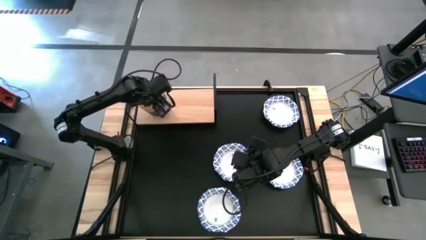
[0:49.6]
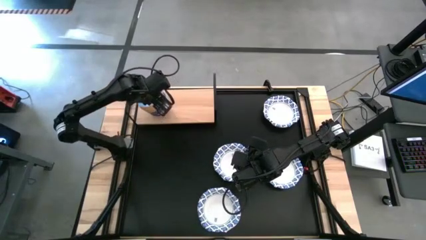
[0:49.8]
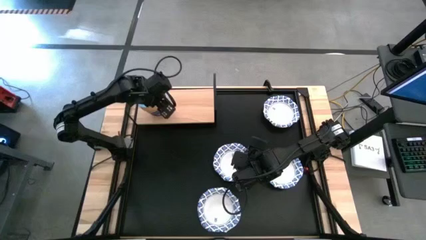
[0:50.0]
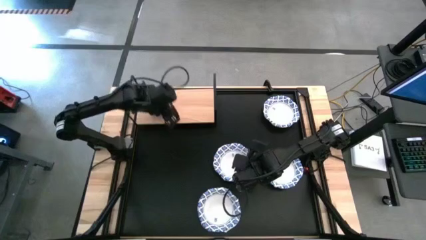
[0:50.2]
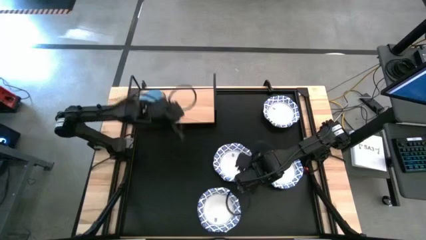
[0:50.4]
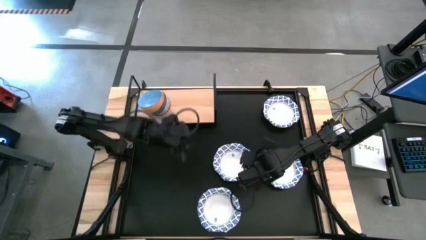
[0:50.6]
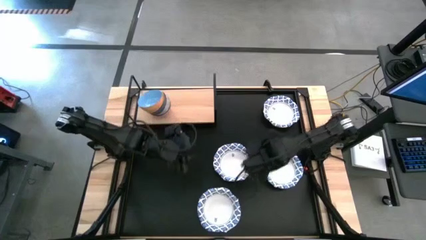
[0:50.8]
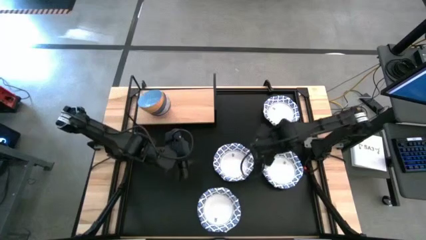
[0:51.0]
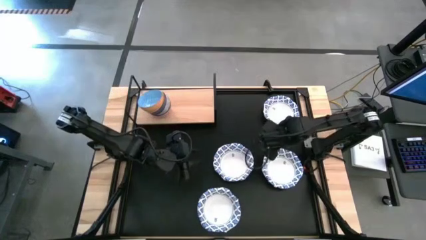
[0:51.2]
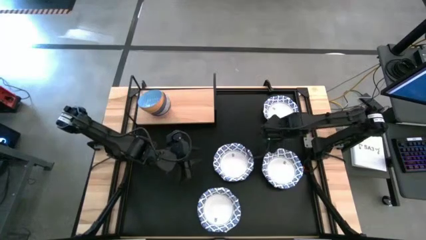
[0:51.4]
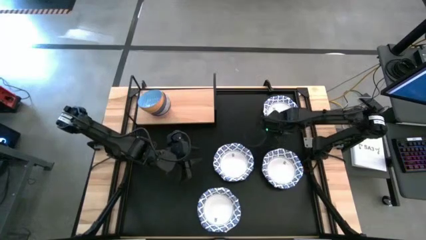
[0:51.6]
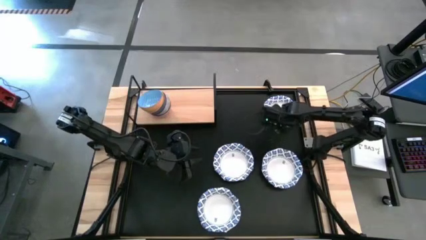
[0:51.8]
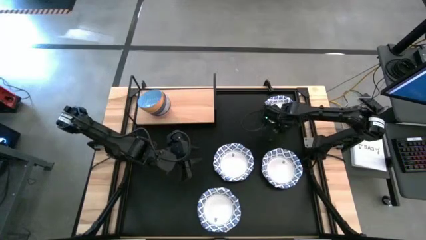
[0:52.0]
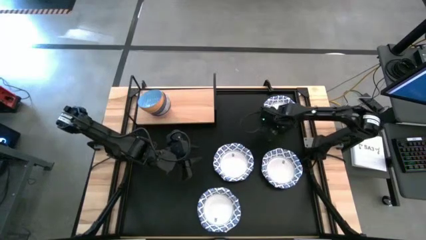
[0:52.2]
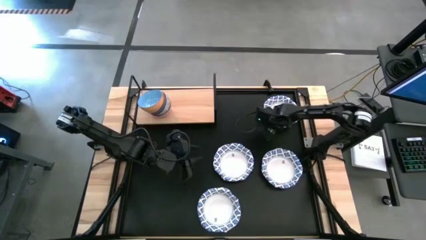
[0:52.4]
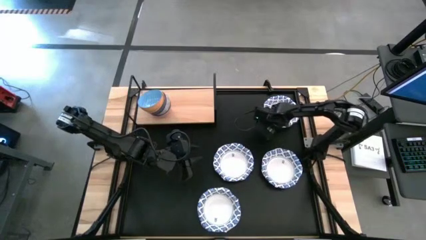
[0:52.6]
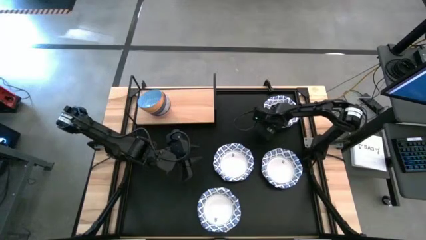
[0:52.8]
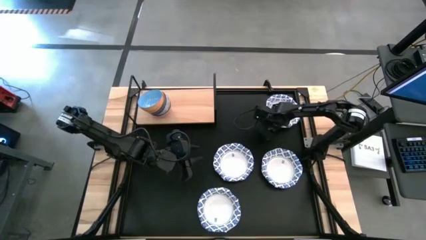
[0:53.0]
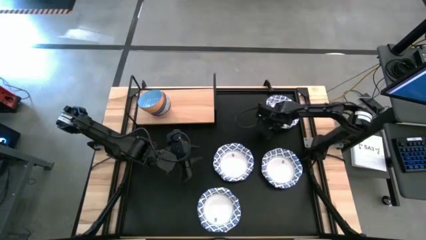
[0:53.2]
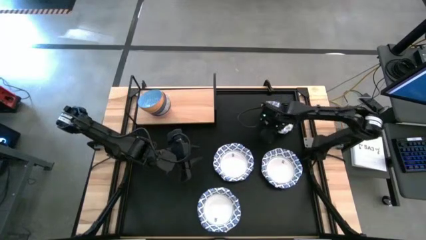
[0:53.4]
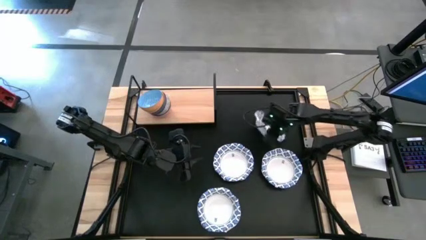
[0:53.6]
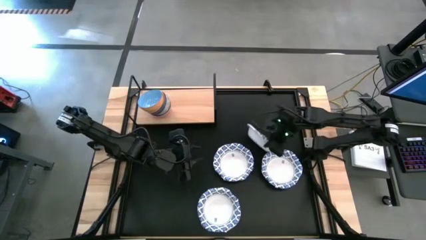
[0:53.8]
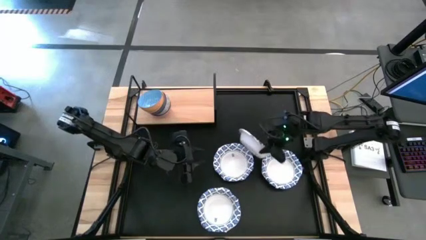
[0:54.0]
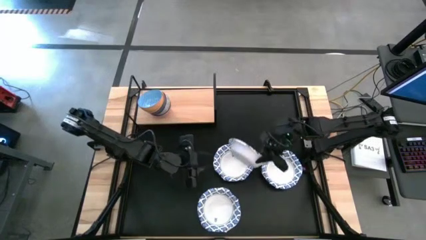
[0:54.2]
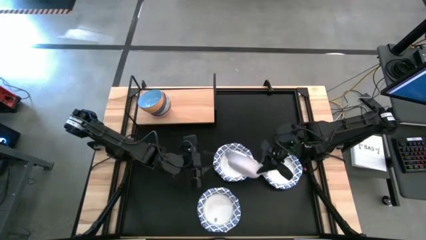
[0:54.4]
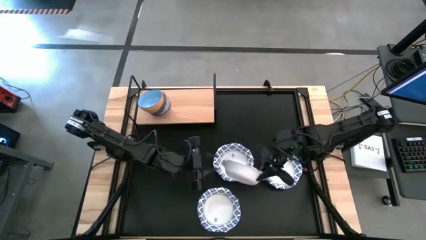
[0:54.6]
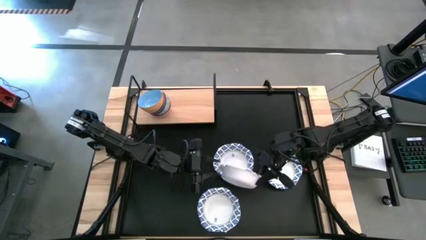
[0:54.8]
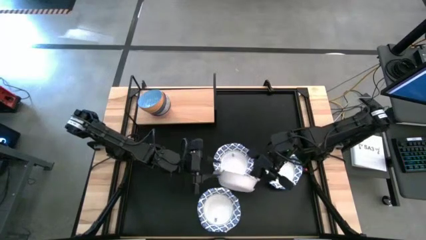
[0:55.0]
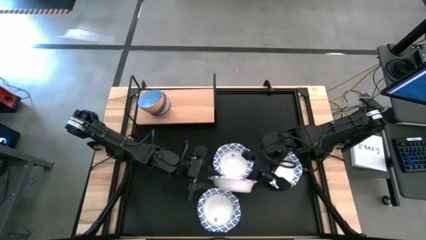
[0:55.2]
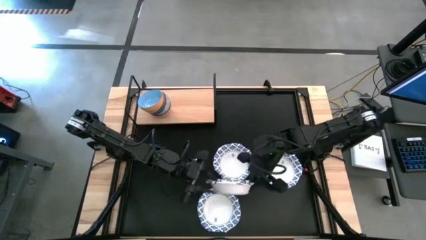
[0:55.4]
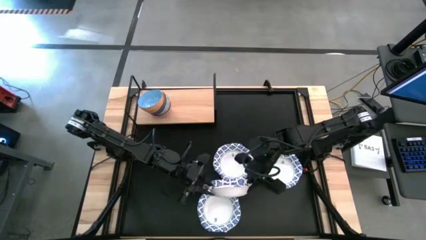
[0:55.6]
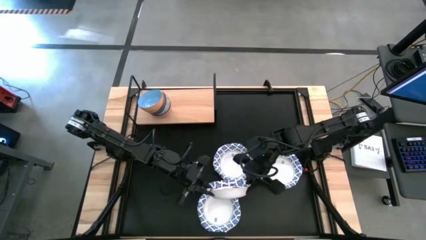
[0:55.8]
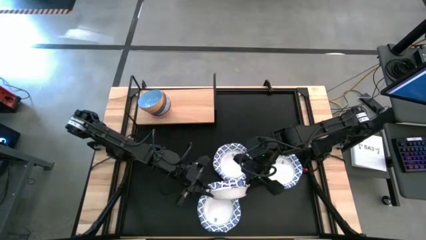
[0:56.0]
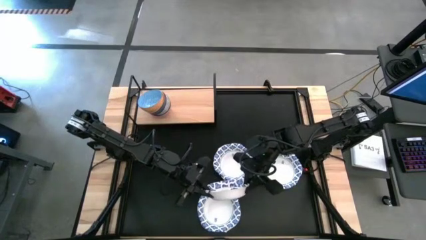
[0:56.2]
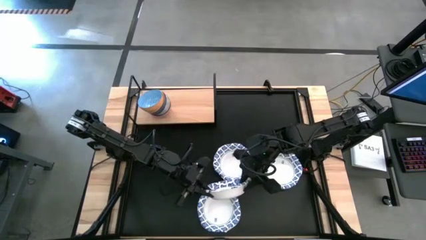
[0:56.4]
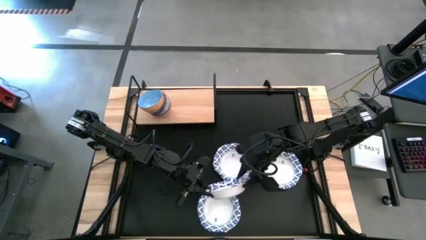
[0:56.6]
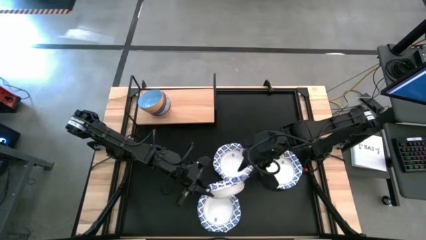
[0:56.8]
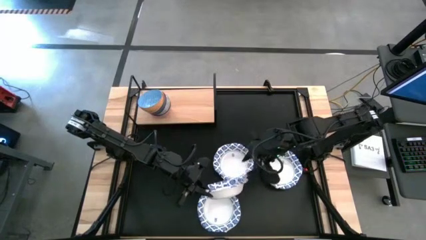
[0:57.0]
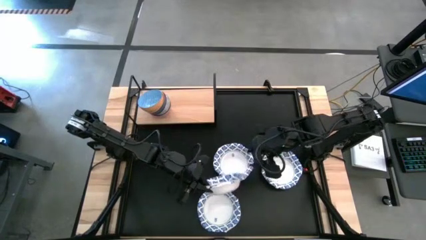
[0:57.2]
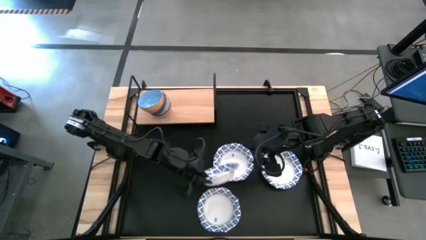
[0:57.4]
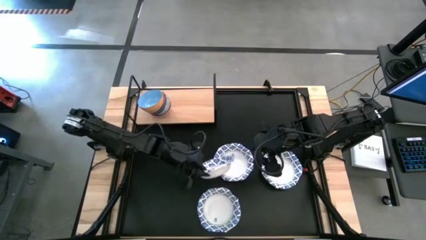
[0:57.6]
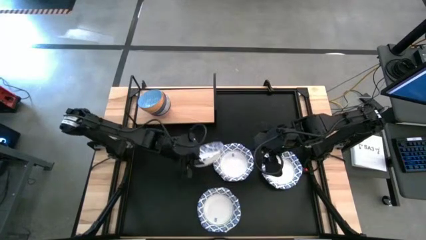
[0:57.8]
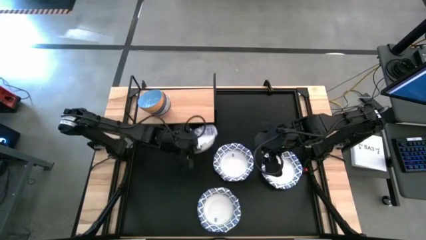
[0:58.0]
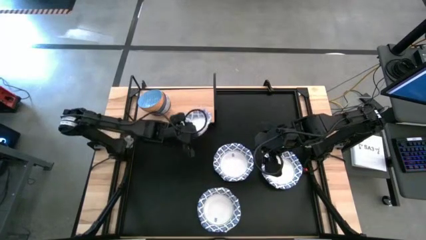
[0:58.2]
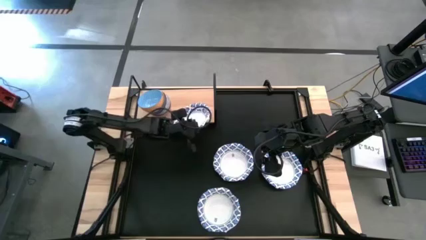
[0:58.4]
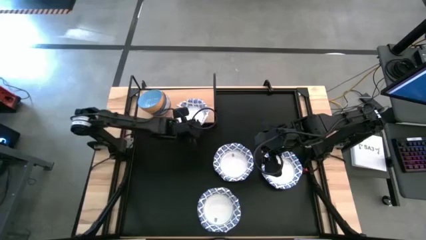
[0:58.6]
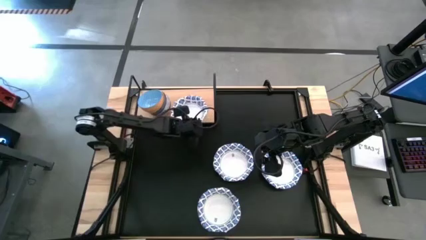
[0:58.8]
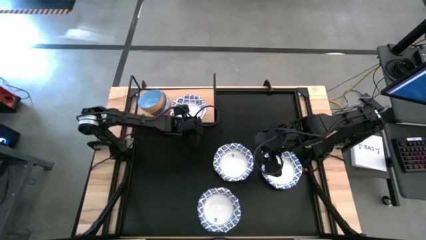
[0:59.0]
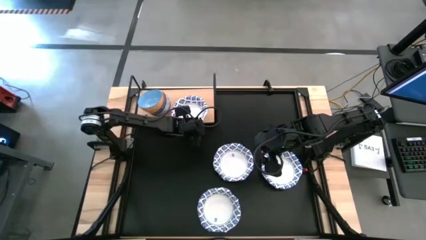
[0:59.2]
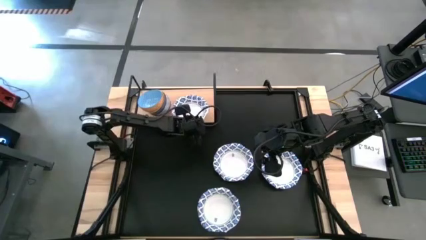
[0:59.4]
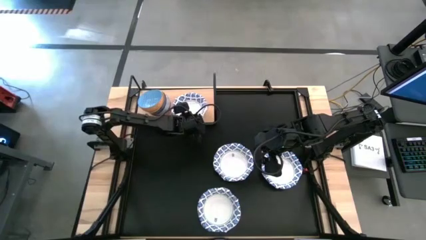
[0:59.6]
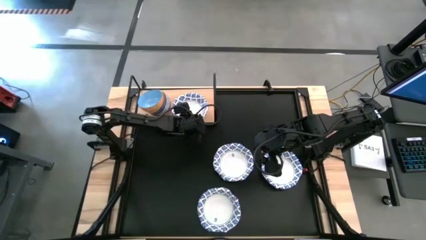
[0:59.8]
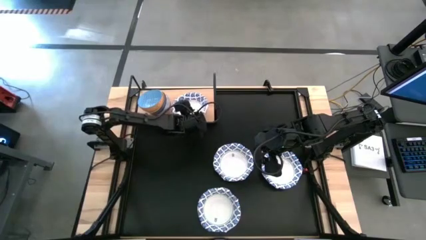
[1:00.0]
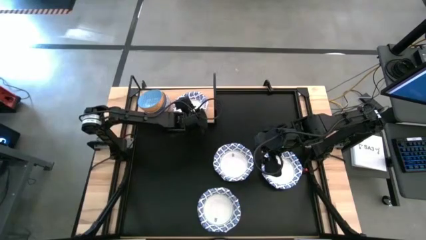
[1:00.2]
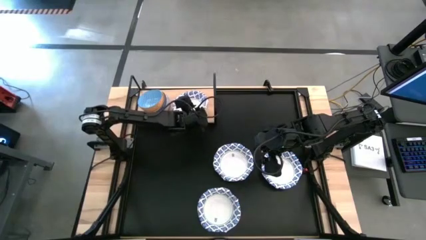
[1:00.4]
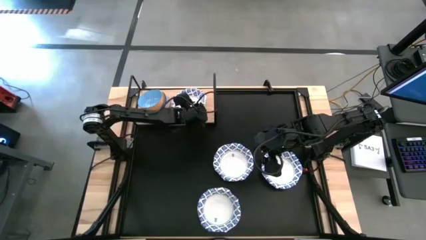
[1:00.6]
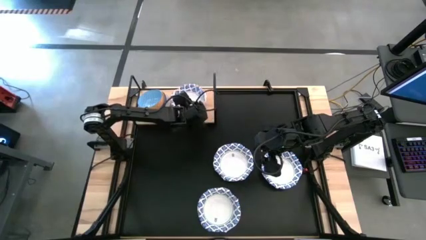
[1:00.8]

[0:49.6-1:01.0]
Task: Place and stack bowls onto a shelf
Put the top white bowl on the shelf
